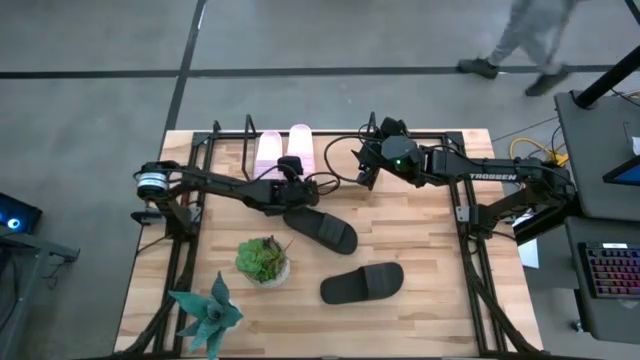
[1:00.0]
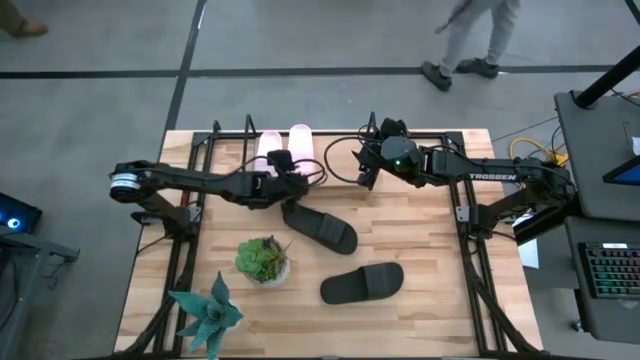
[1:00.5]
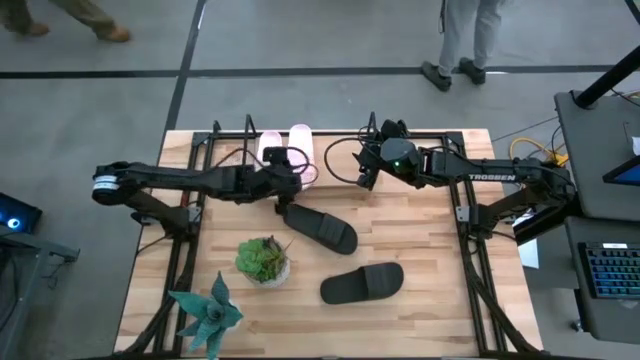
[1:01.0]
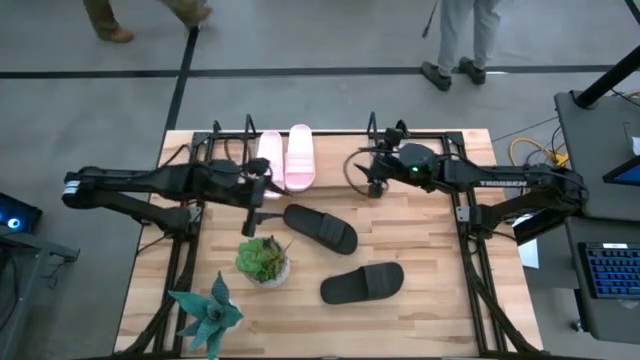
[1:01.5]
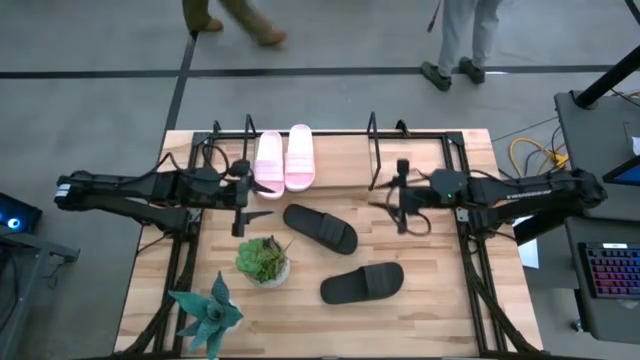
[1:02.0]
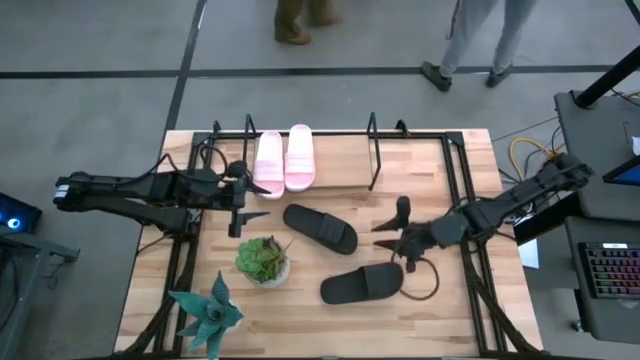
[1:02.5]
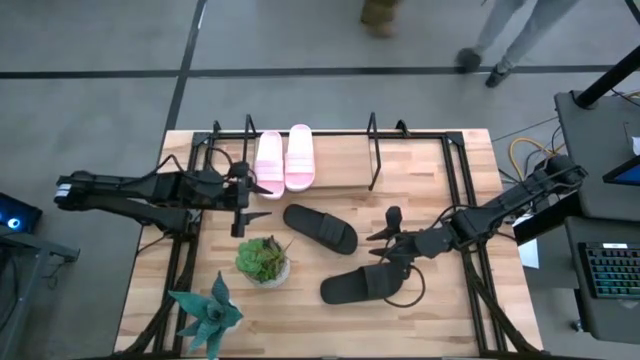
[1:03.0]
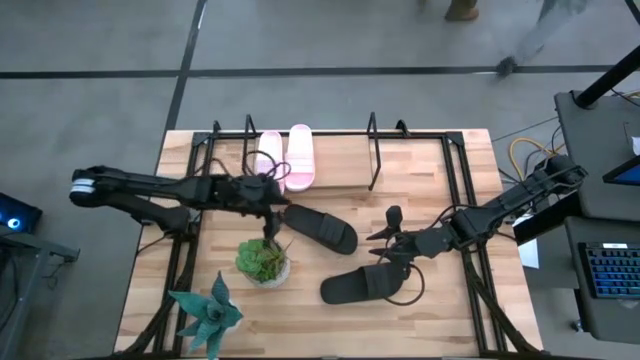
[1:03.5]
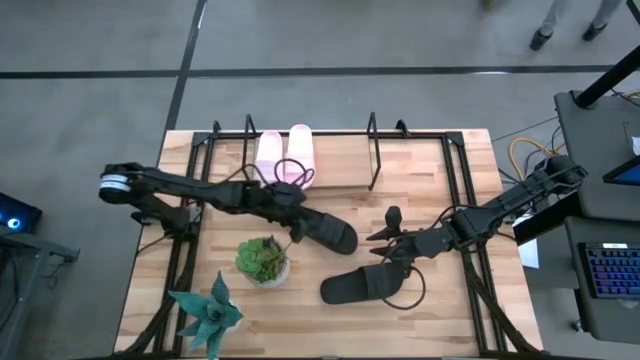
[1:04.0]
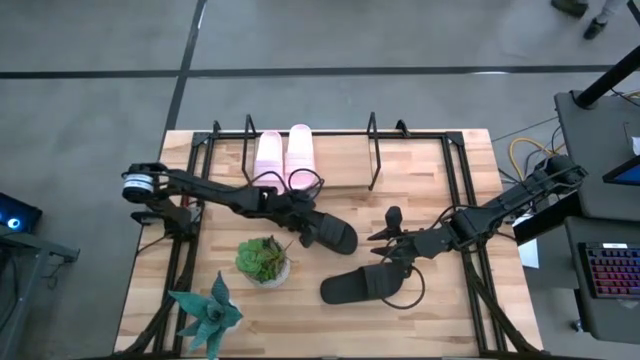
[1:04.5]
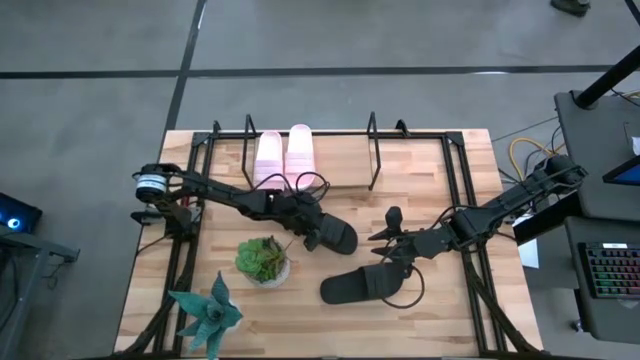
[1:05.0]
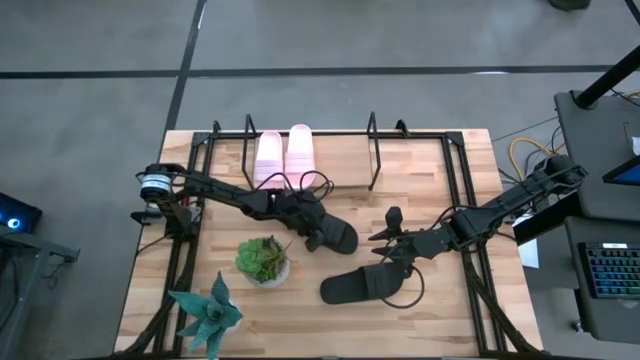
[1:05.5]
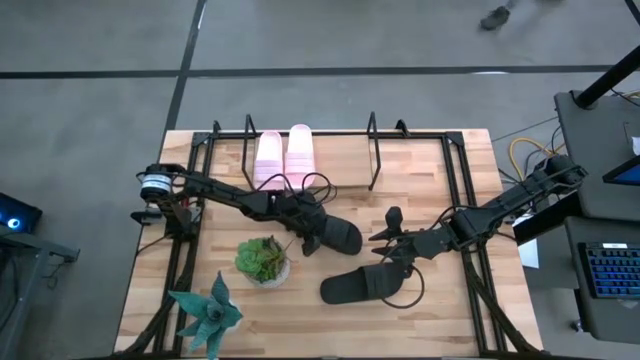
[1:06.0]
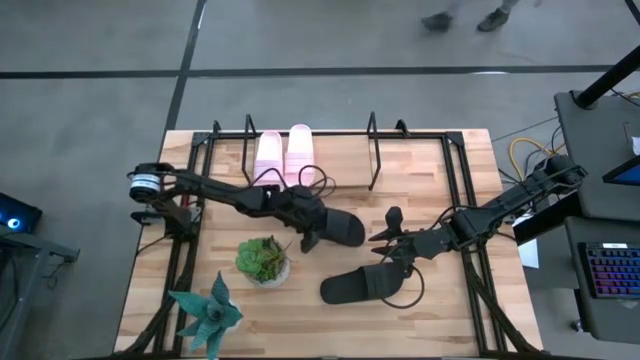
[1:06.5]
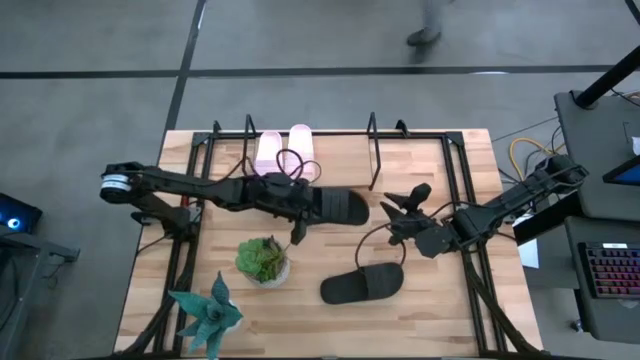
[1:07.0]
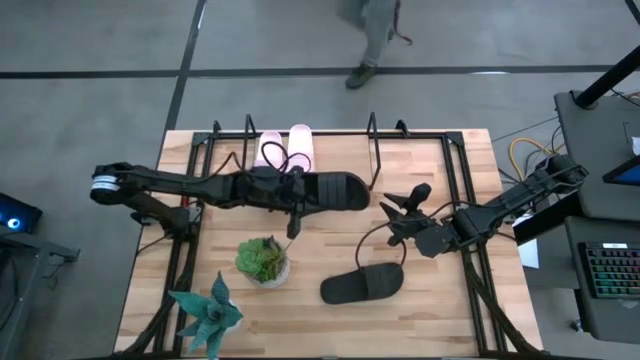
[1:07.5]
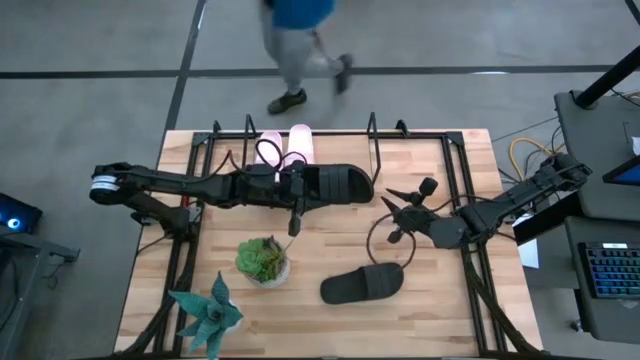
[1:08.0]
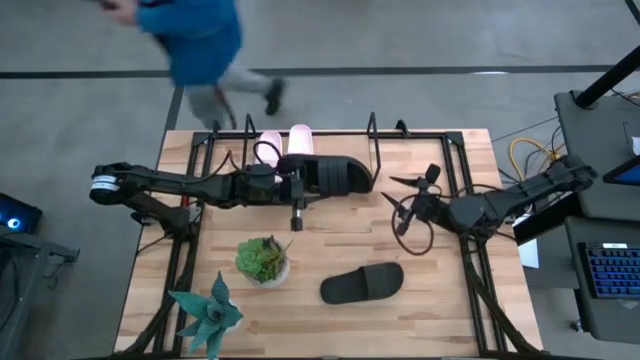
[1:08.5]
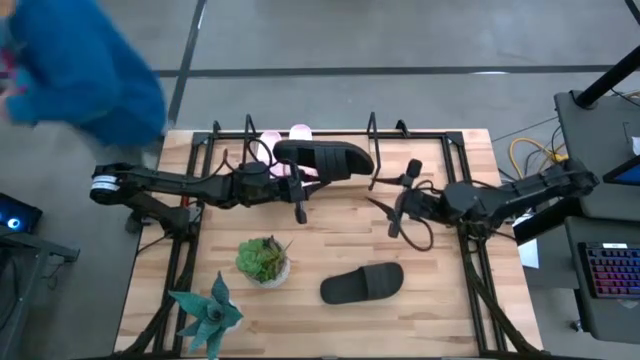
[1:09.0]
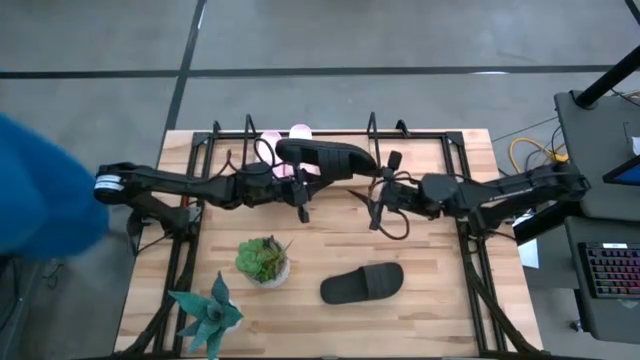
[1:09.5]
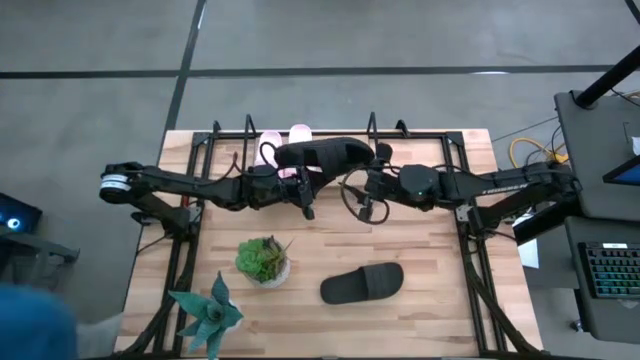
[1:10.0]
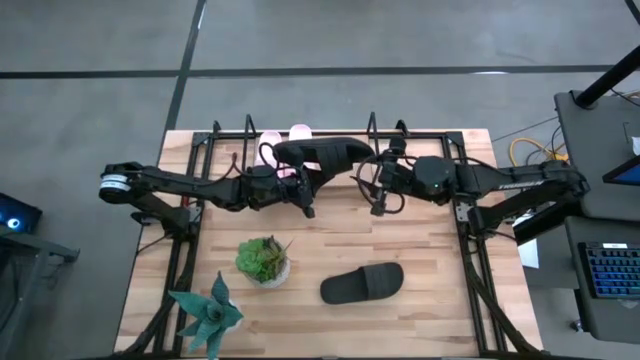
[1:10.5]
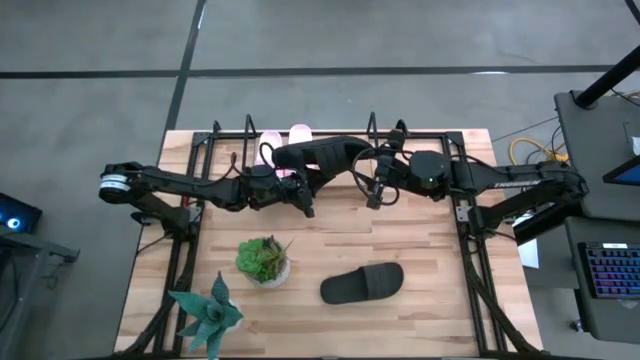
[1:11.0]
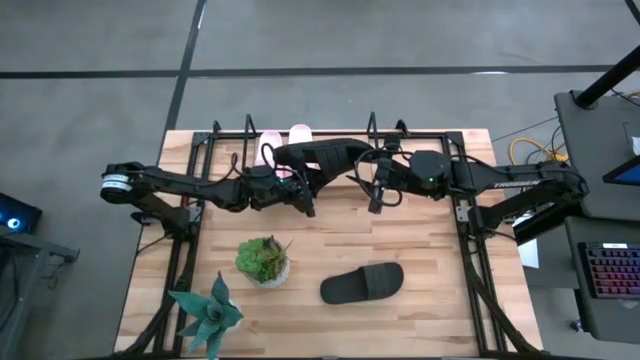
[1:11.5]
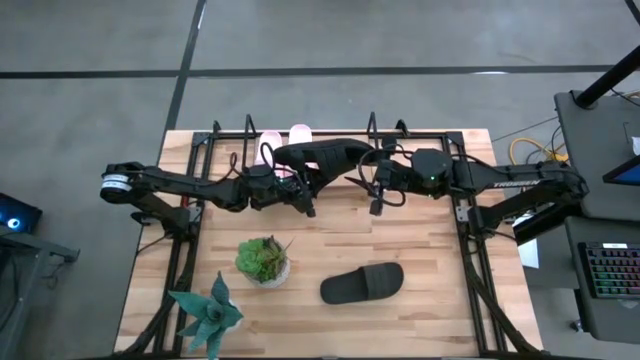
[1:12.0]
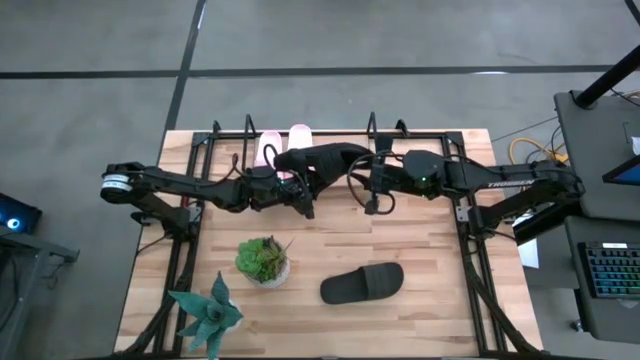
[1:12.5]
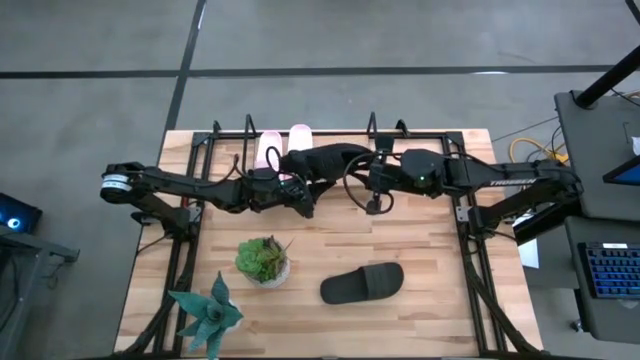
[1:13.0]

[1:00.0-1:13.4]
Task: Pick and place slides into the shelf
Put the top black slide on the shelf
